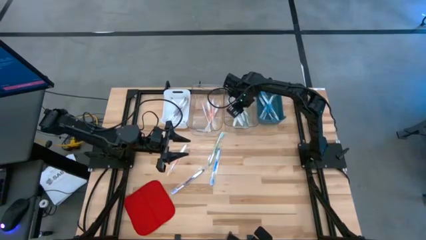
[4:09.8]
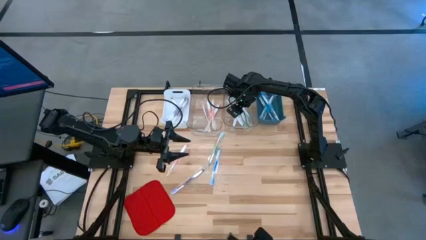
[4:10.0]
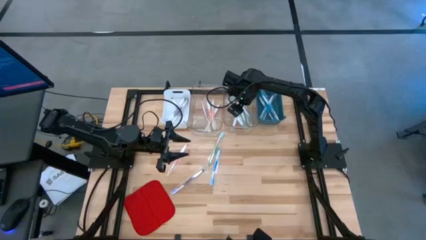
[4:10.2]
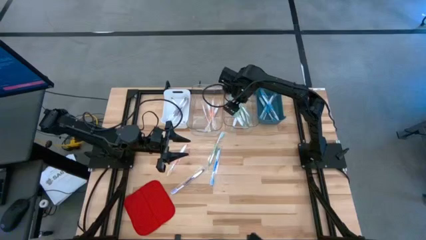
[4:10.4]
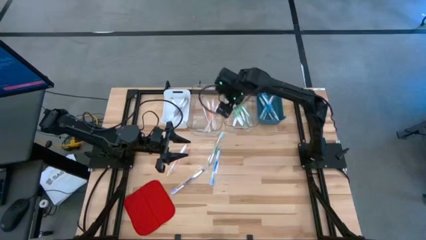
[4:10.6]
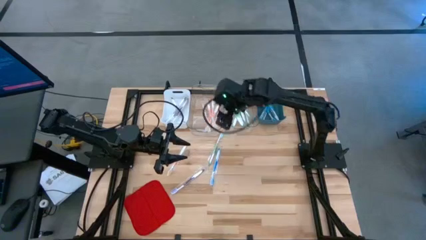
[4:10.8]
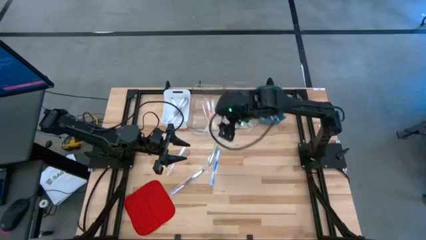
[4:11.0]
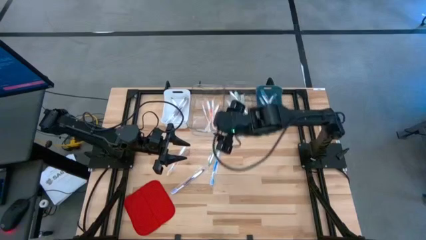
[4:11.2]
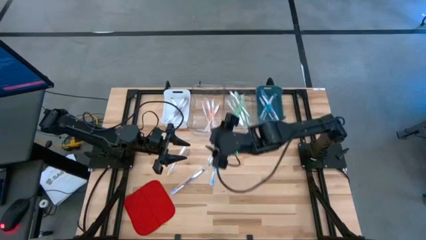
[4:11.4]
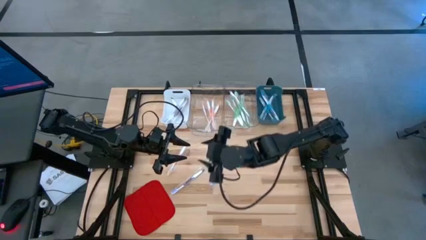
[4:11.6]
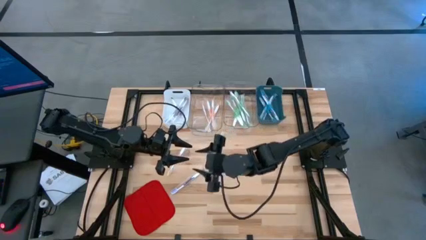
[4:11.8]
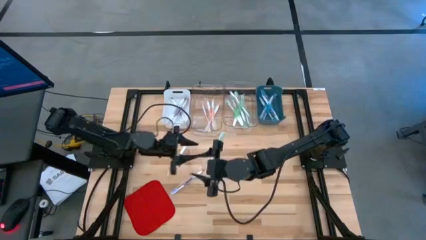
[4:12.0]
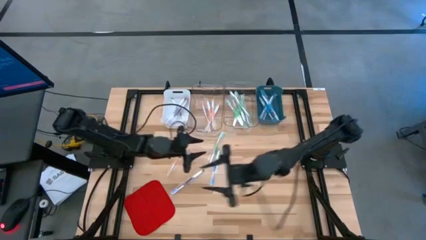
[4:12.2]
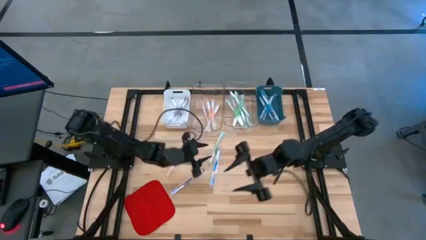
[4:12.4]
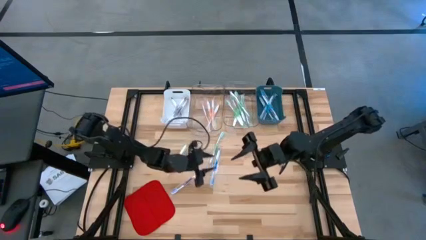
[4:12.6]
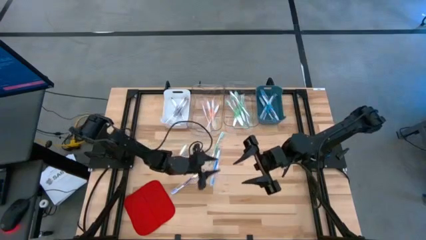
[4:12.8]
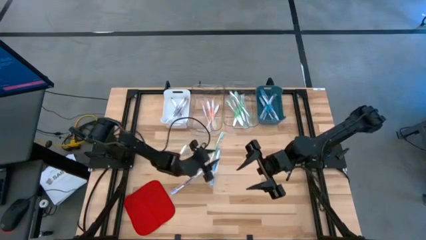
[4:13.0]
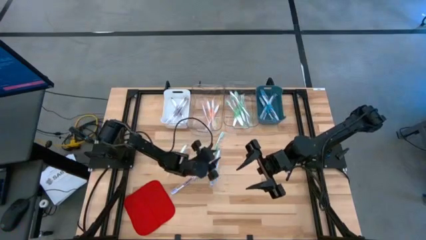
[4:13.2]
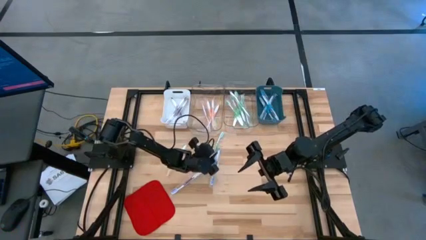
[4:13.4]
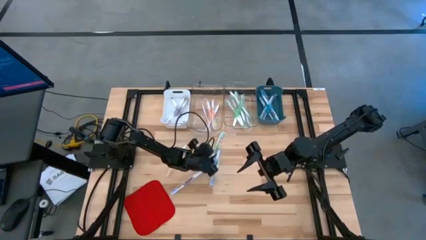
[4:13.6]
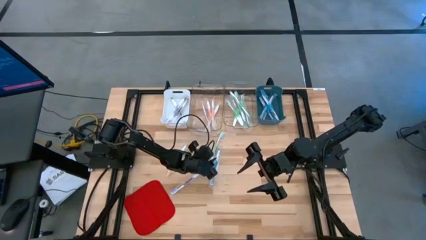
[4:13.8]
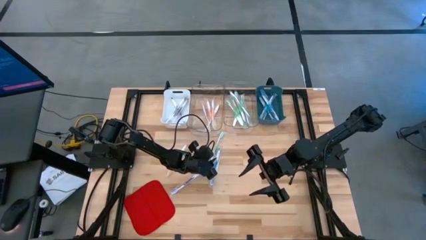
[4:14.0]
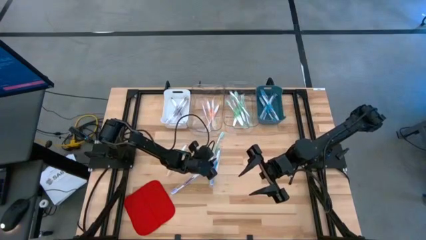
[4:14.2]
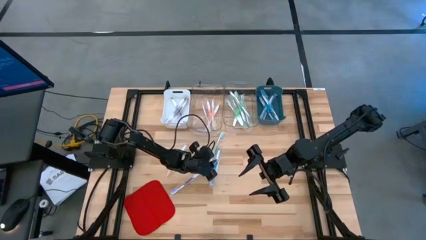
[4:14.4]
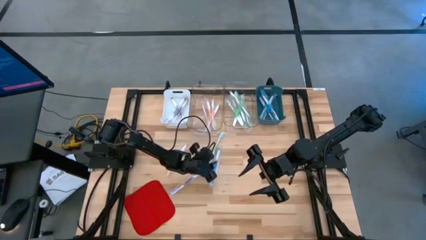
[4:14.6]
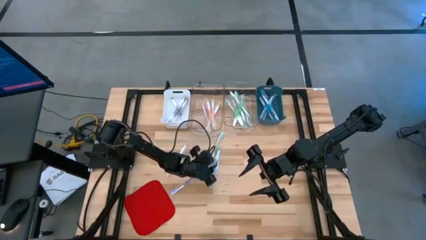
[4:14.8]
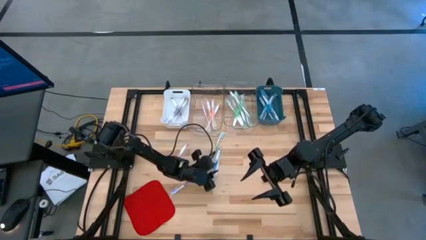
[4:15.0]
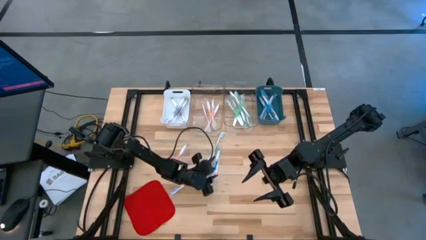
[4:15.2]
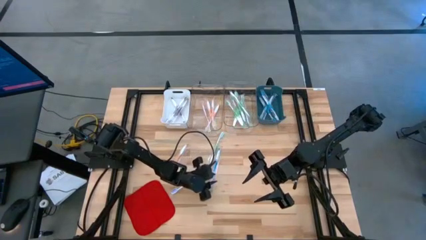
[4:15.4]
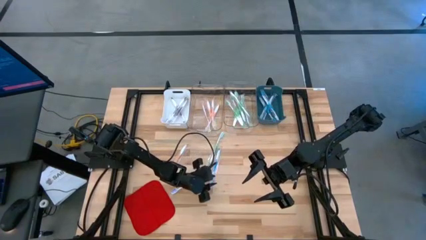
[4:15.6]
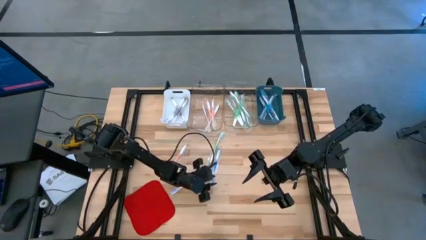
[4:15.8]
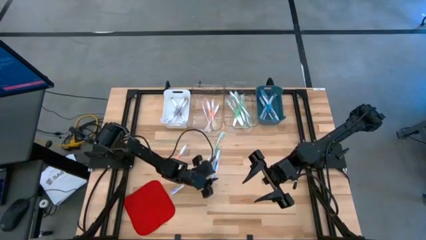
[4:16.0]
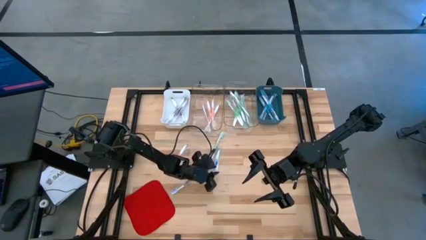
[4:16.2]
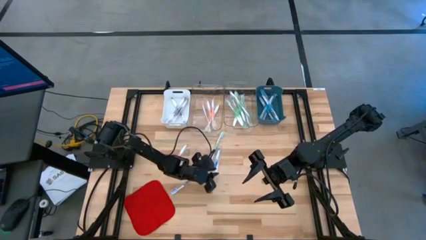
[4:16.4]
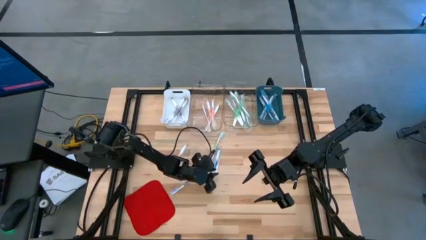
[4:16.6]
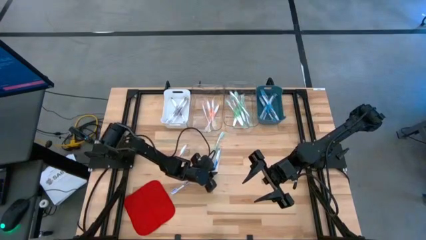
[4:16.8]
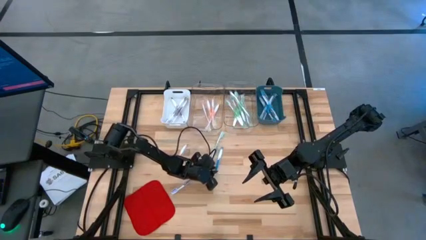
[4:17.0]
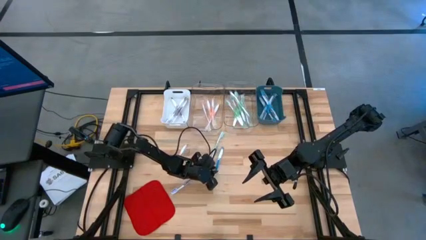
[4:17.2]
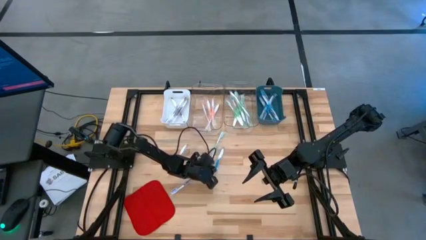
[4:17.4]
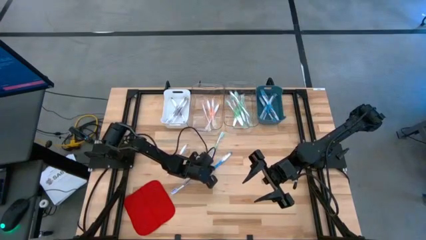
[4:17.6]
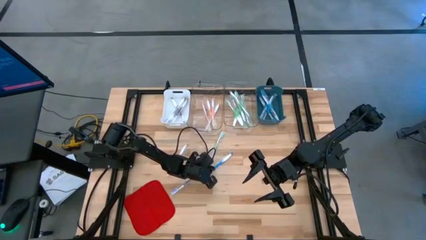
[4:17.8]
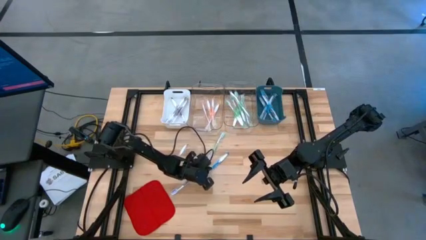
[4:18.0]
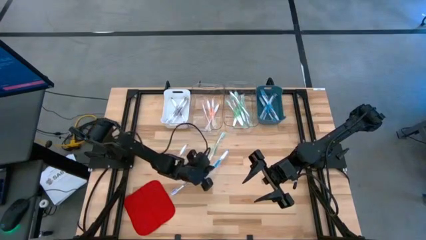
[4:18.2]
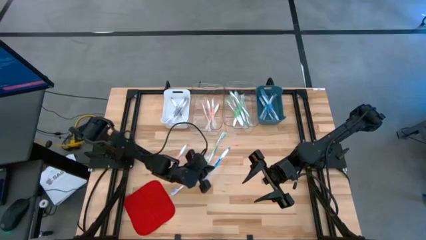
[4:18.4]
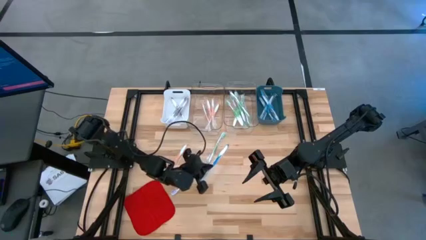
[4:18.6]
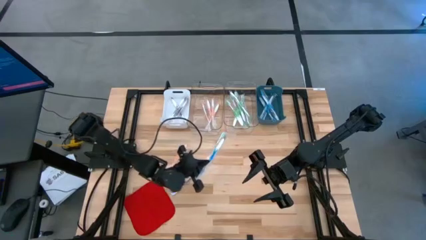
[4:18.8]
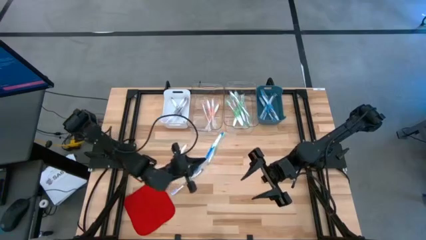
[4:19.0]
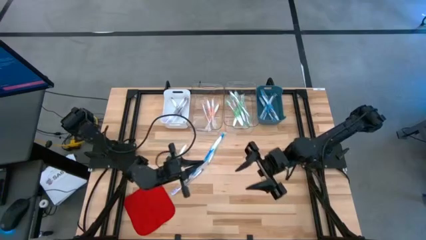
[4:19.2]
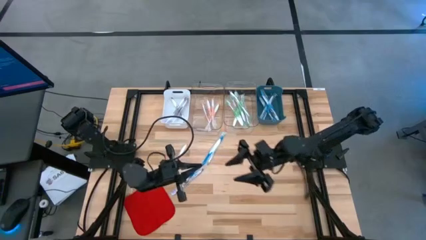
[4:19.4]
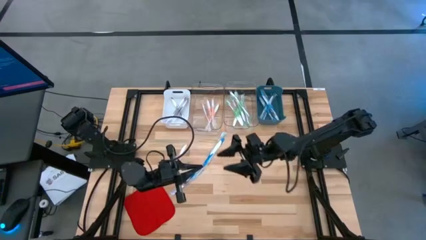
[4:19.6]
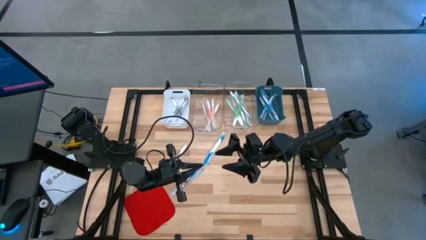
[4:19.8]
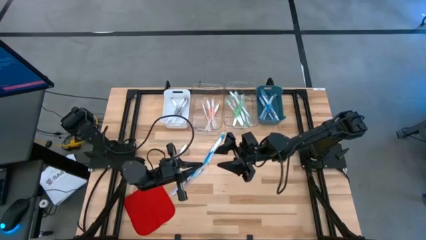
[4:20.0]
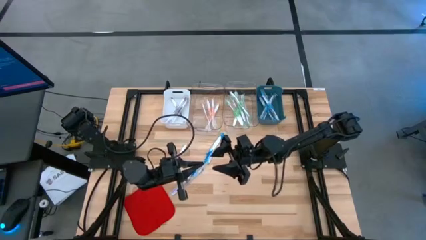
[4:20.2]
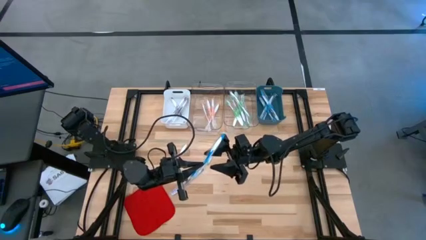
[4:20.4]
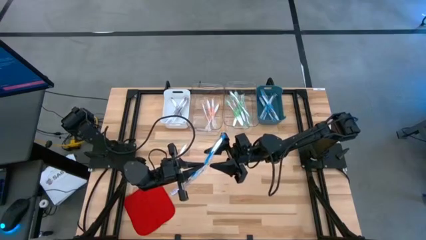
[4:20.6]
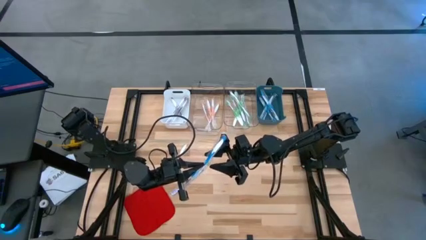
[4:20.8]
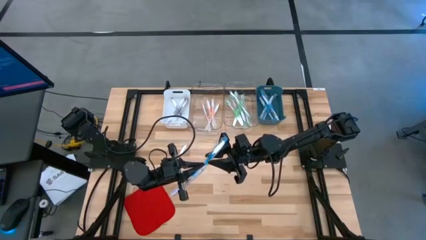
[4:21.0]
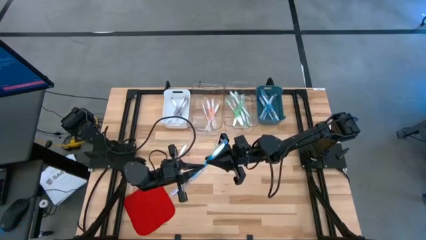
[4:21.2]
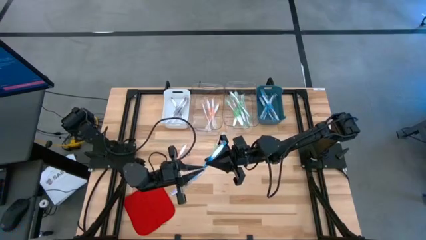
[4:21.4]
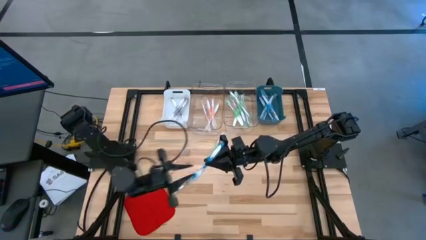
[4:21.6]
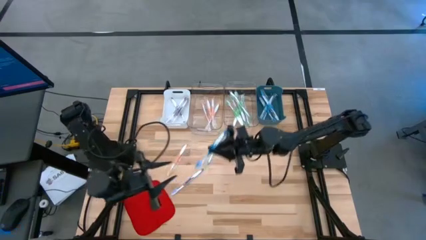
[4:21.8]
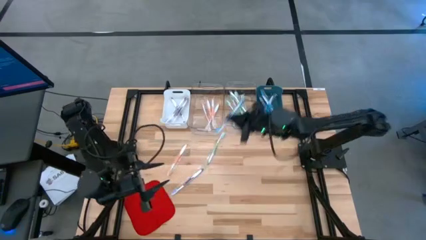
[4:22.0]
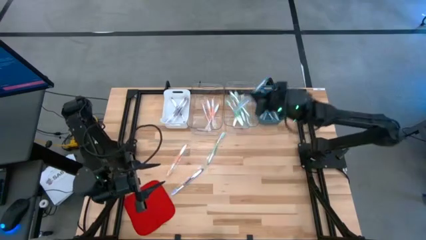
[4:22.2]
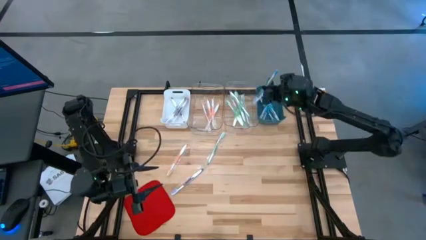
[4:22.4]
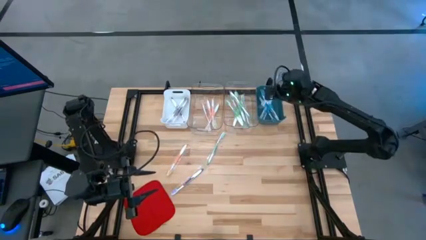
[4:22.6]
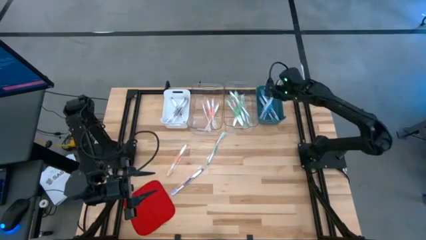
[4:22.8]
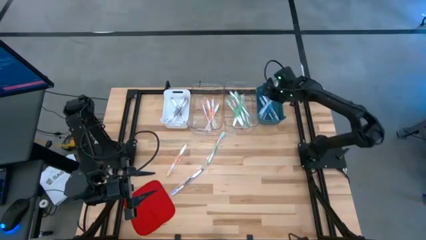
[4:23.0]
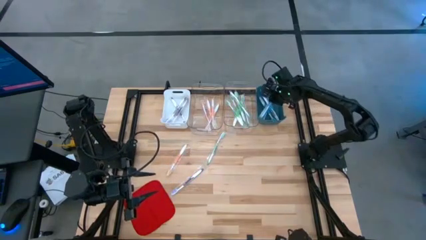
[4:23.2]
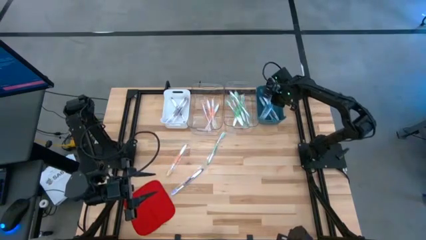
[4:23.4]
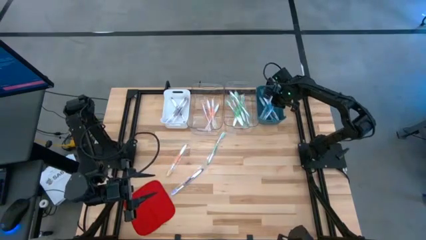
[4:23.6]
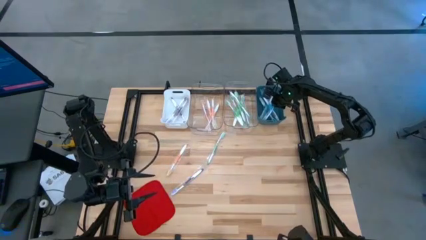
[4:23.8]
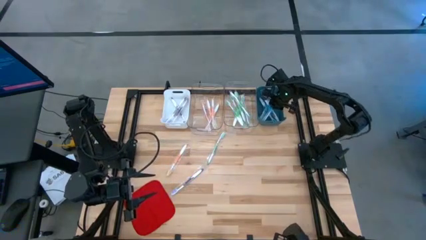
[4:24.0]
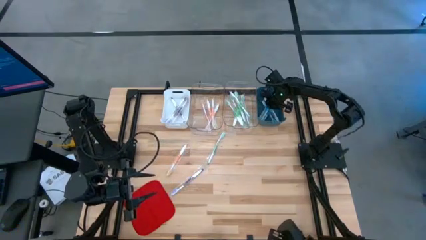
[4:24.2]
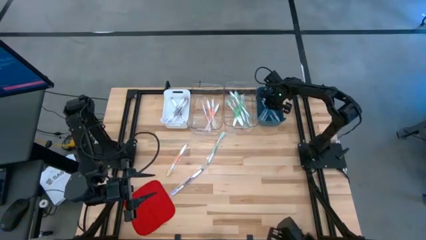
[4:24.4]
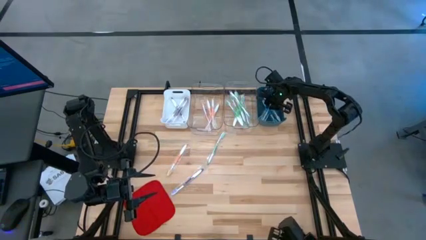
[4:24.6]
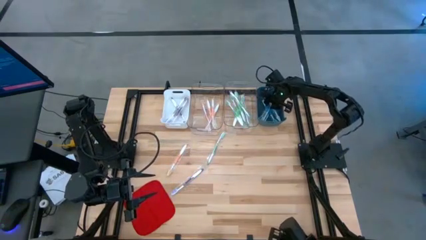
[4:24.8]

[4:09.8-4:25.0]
Task: Pick & Place Toothbrushes
Put the blue toothbrush into the blue bin
